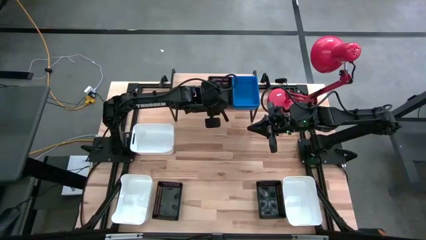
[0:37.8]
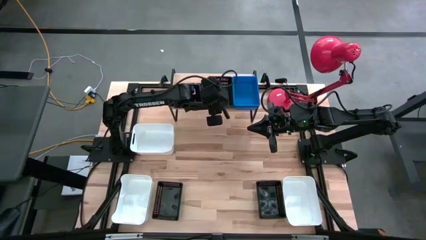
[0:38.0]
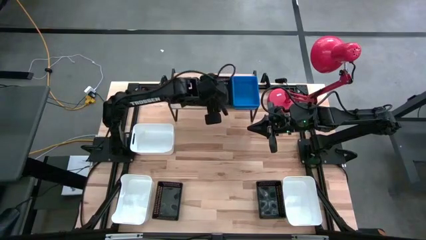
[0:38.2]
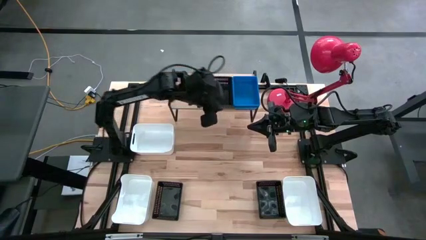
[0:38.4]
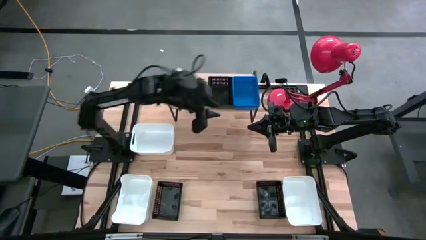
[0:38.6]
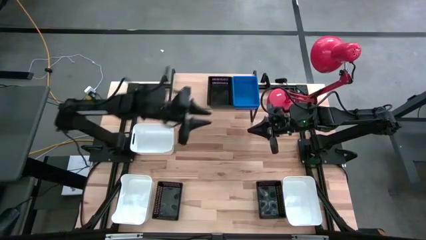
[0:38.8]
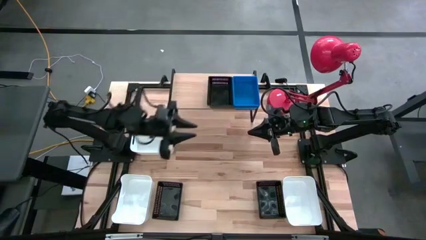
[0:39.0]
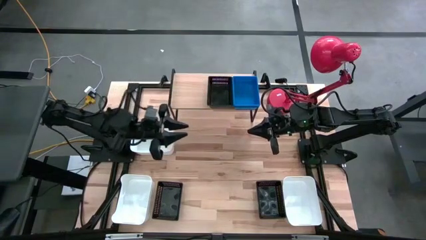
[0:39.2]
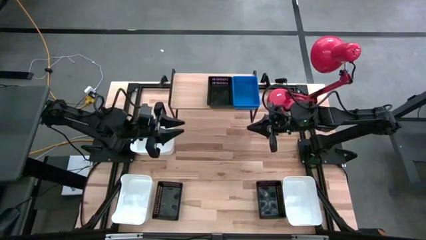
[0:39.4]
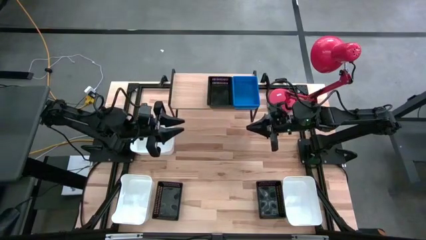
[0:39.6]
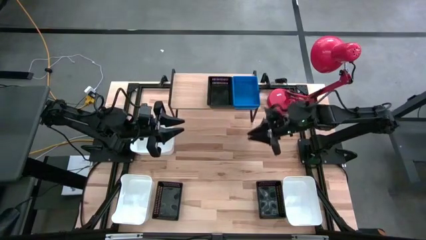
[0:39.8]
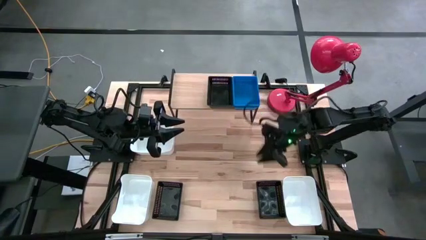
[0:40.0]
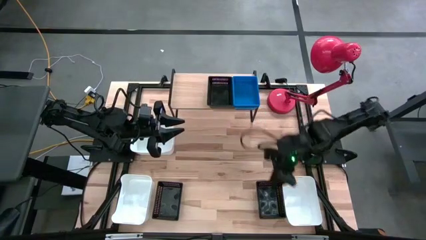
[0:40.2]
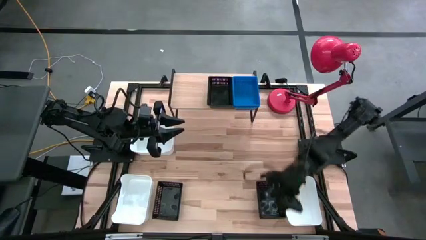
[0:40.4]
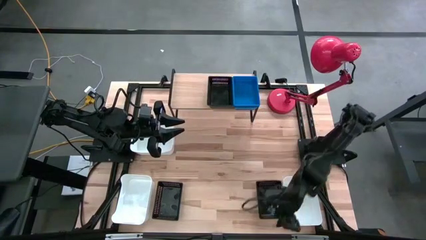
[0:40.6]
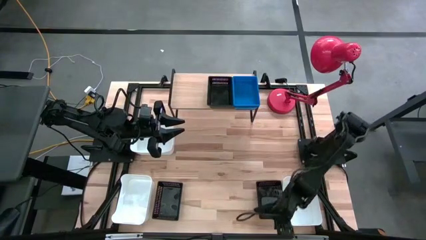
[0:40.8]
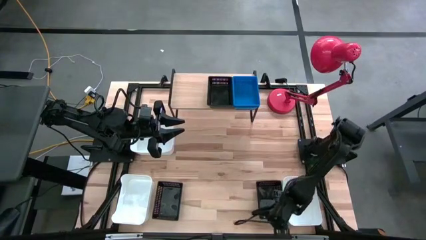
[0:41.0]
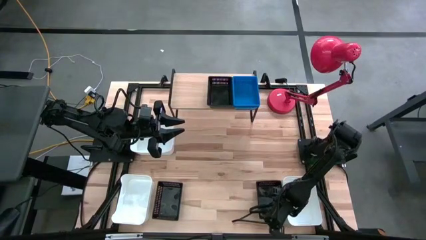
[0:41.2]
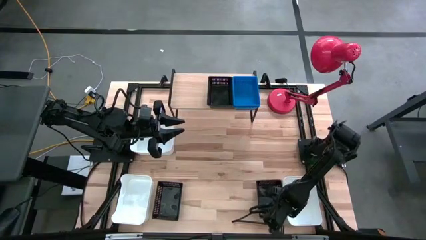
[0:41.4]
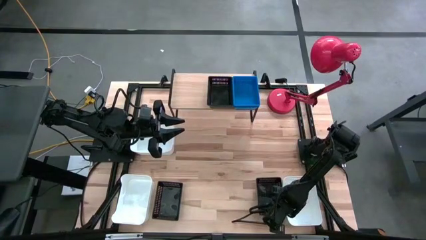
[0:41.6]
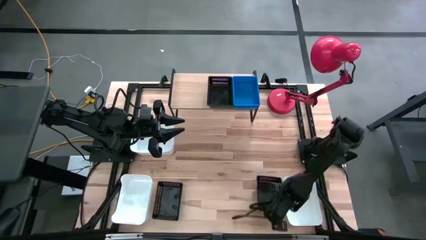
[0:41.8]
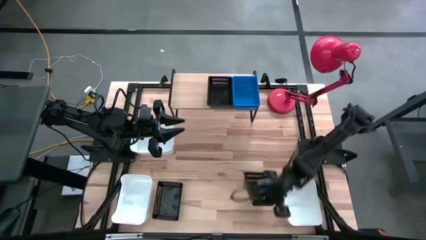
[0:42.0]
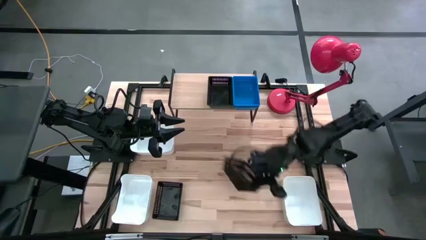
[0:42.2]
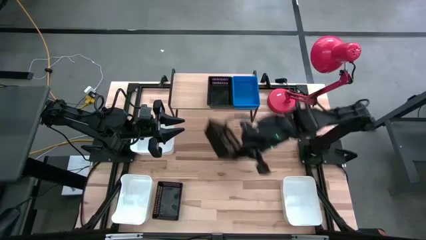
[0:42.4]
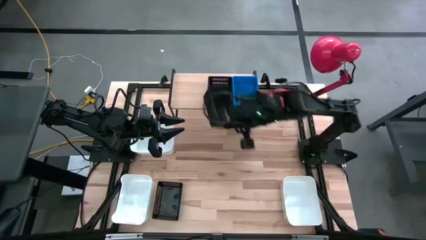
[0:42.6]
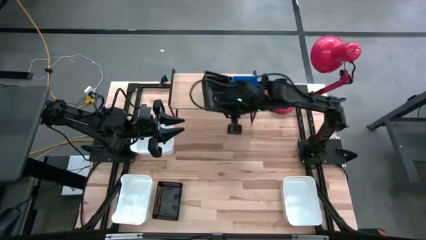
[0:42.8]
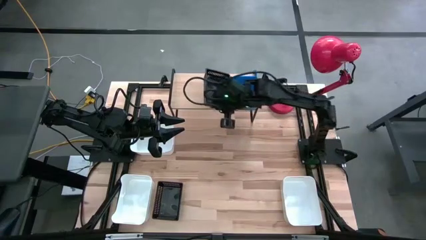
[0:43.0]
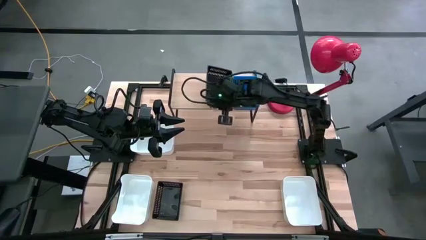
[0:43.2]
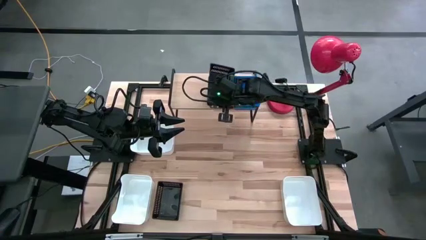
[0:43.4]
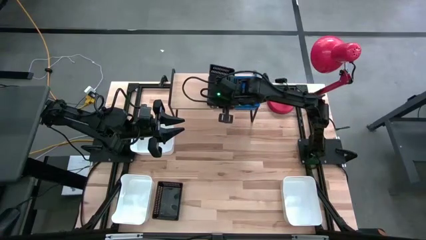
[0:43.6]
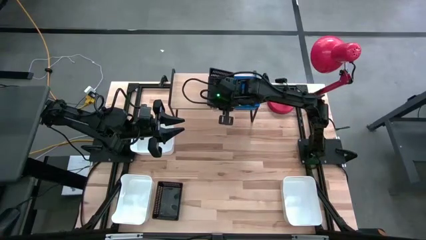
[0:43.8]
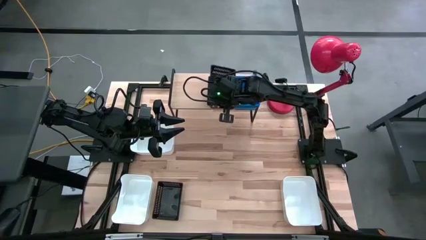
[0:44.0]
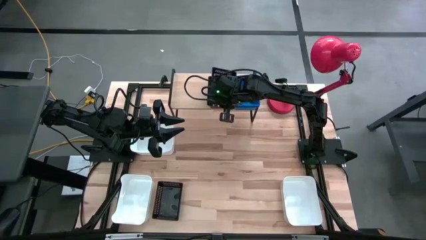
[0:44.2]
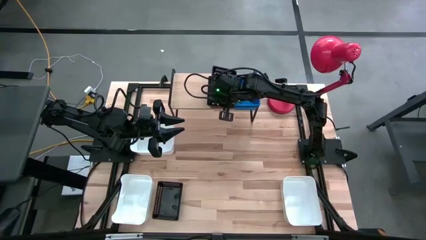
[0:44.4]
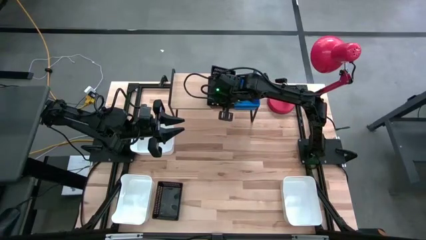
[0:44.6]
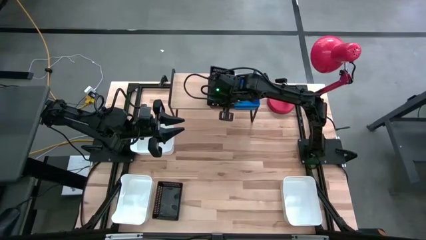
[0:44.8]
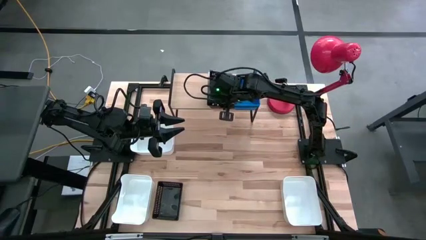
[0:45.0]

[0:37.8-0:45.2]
Task: Stack baskets on shelf by color
Stack the right black bin on top of the other black bin on the shelf

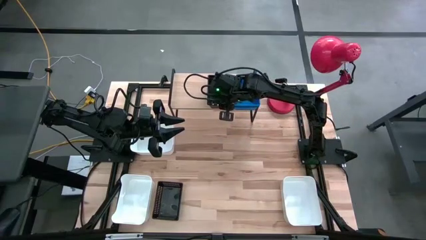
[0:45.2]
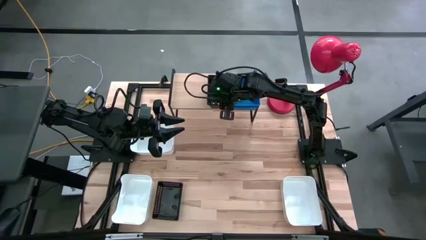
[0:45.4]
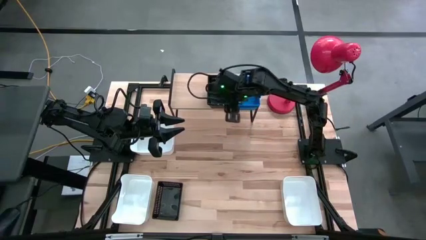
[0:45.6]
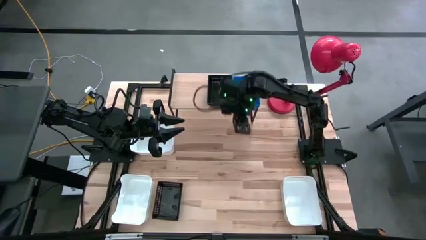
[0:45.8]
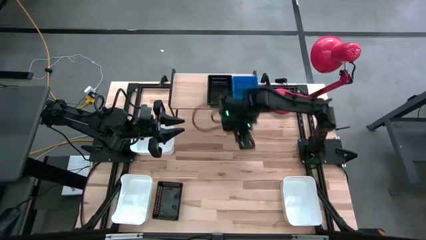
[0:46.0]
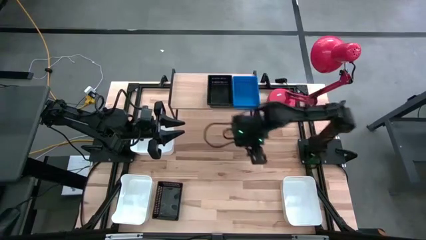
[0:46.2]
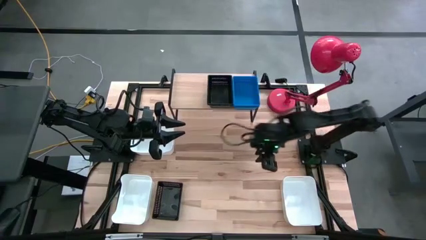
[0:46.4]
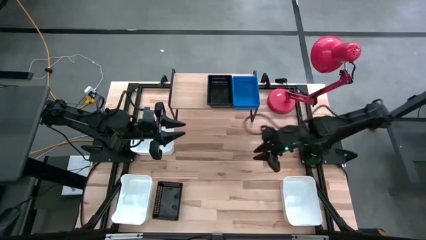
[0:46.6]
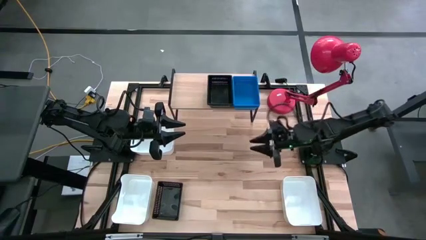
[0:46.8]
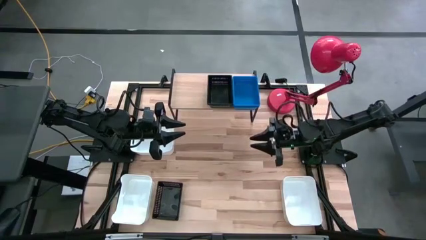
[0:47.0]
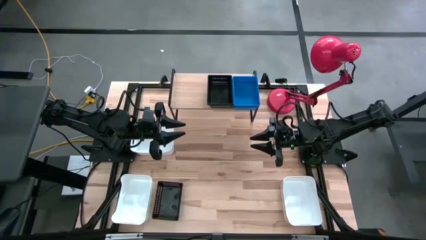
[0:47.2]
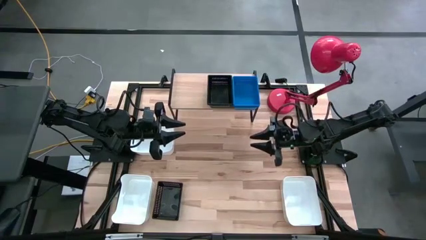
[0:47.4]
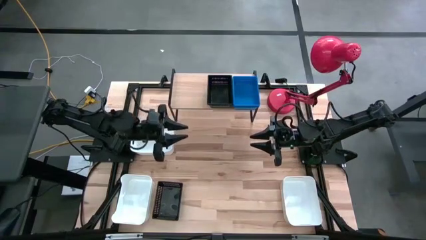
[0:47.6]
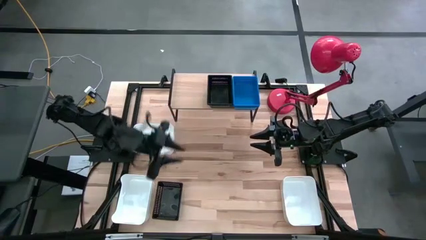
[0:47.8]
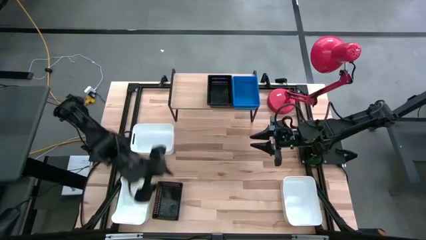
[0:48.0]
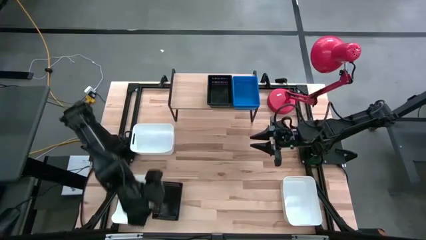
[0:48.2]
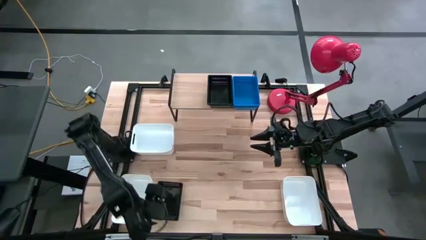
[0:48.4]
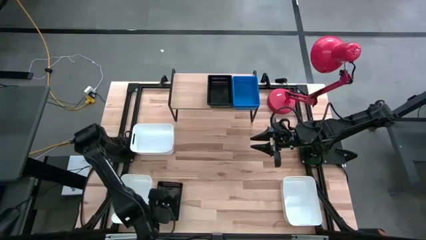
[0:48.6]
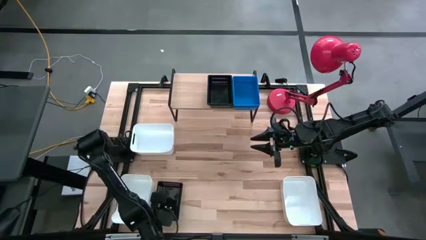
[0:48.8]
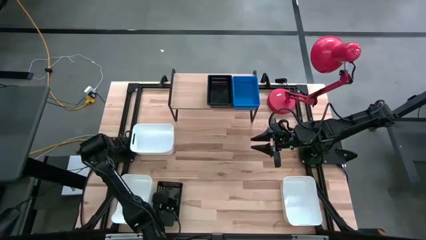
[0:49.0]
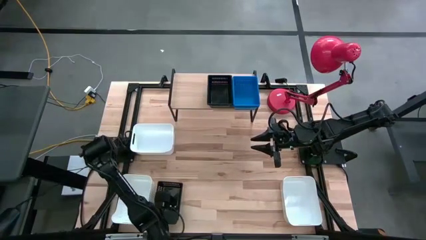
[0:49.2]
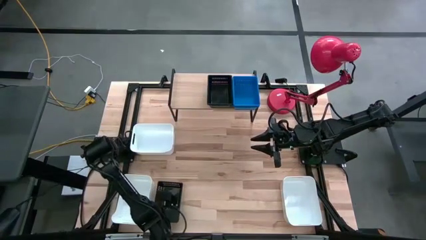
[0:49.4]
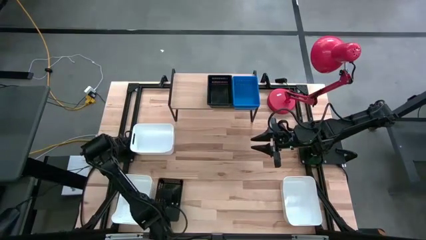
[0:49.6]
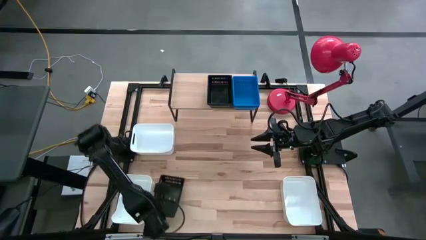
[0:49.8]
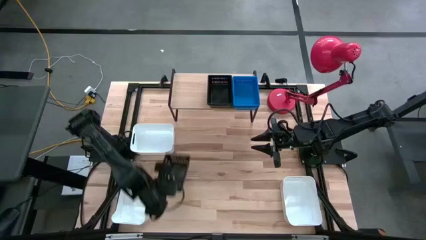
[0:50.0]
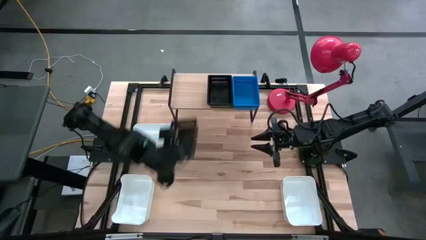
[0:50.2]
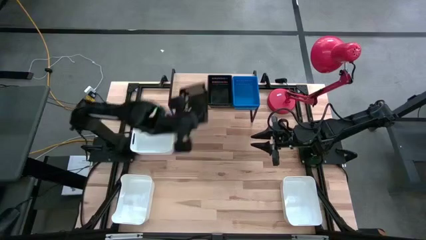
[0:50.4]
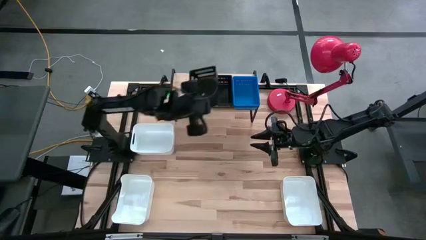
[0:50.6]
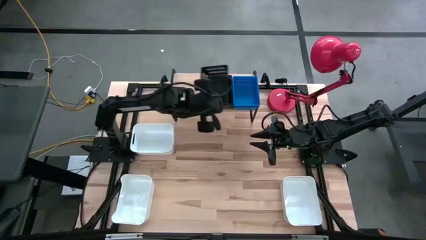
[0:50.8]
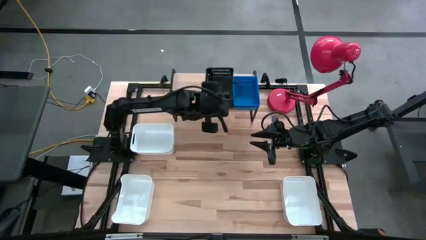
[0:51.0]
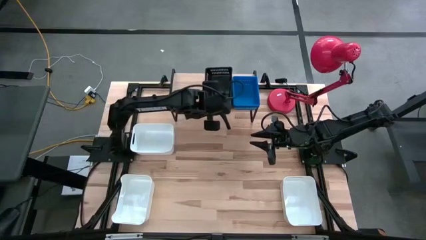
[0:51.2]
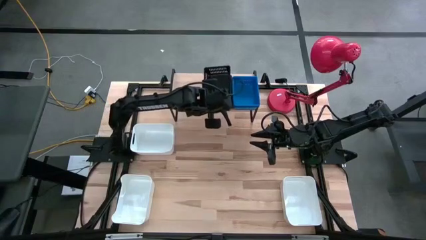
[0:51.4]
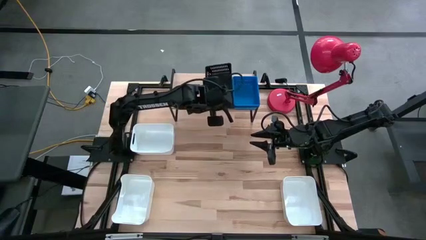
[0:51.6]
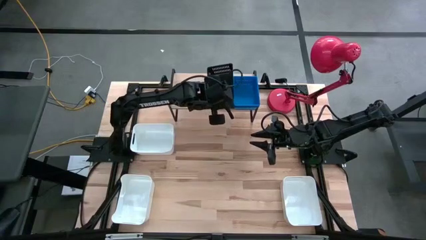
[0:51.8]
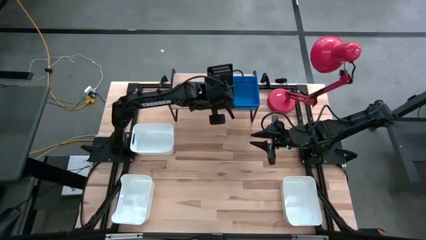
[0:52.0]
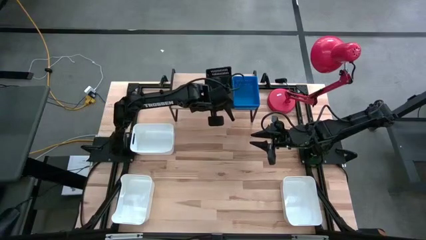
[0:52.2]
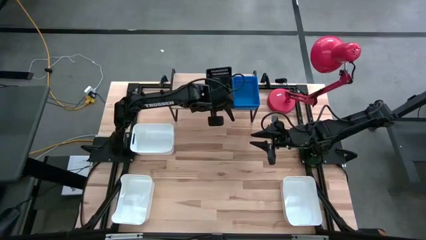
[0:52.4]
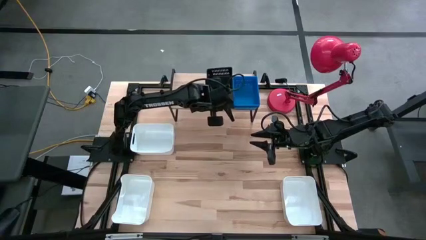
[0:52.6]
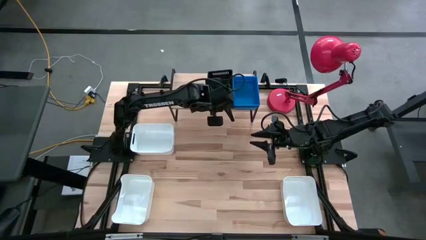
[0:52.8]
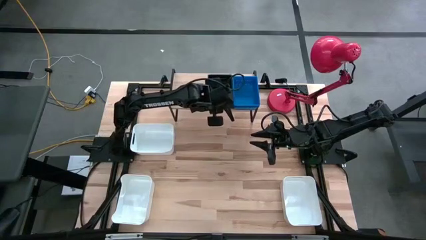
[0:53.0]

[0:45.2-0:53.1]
Stack the black bin on top of the other black bins on the shelf

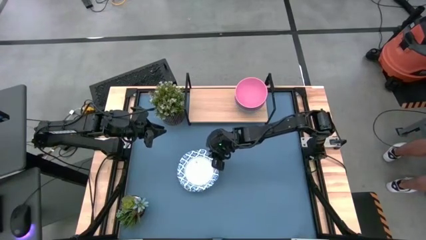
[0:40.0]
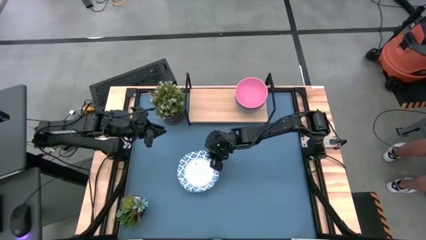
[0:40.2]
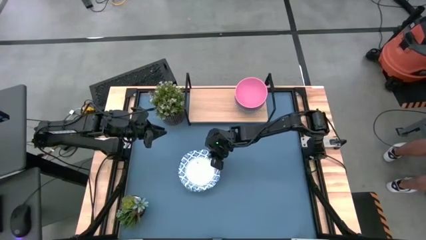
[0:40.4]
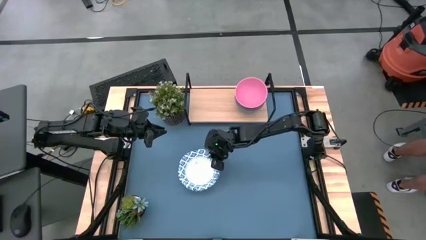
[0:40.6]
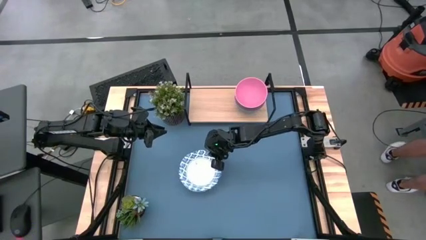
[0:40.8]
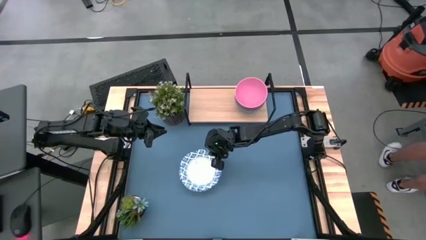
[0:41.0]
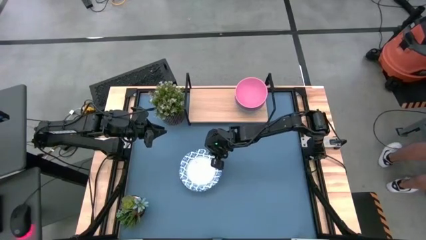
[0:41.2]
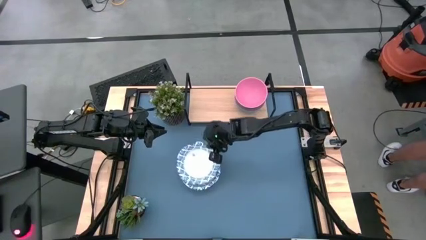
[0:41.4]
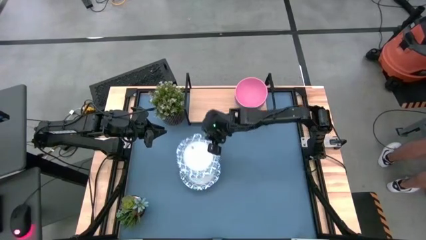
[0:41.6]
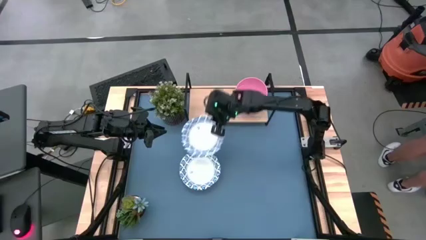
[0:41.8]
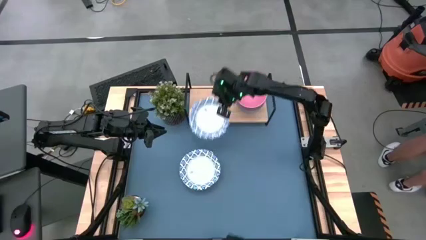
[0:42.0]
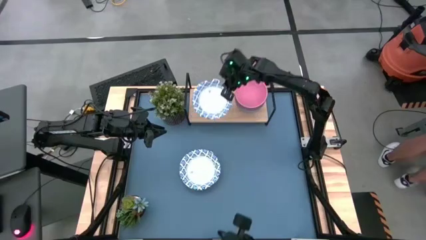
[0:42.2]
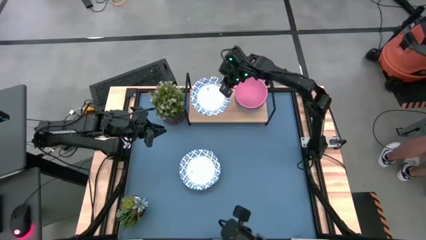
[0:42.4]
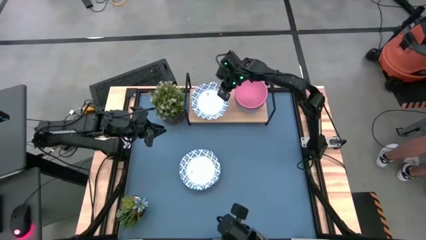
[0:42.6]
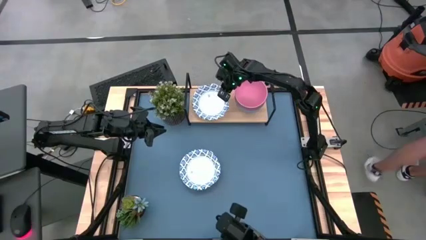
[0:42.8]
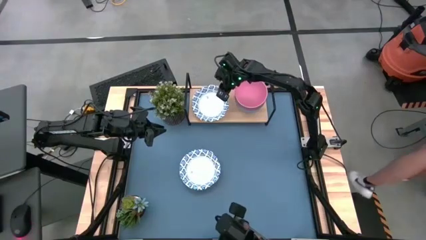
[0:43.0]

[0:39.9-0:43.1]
Task: Place and stack bowls onto a shelf
Put the blue patterned bowl on the shelf
